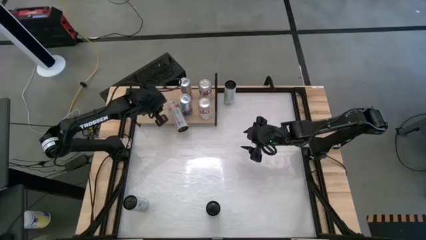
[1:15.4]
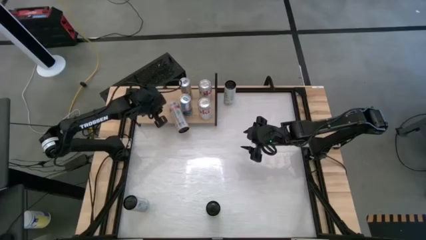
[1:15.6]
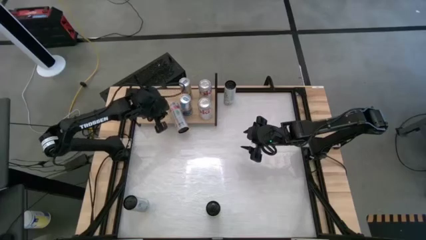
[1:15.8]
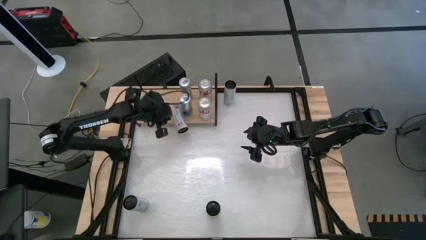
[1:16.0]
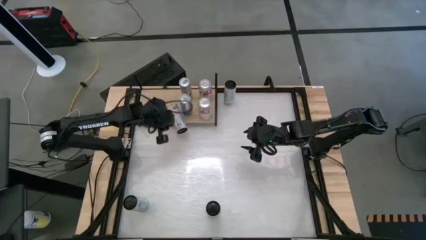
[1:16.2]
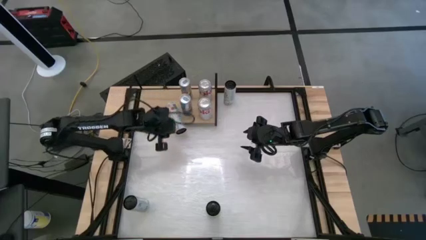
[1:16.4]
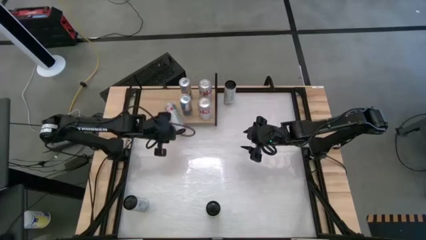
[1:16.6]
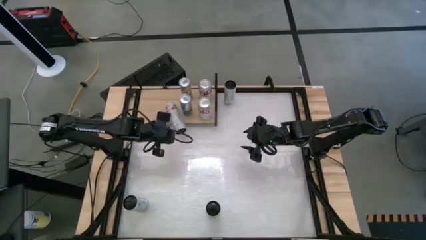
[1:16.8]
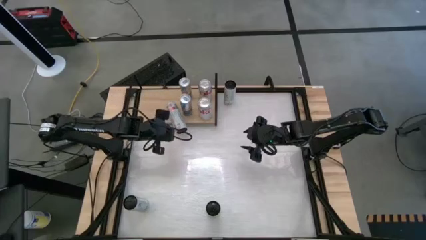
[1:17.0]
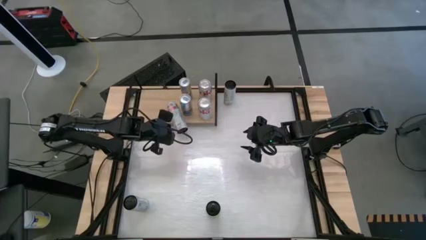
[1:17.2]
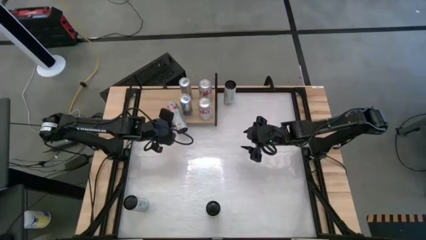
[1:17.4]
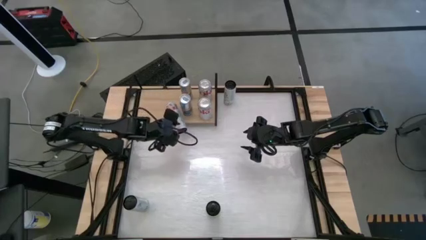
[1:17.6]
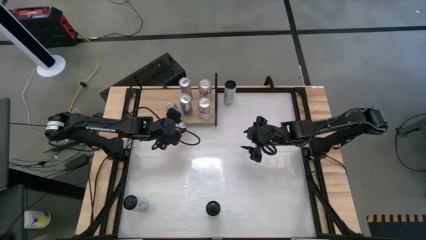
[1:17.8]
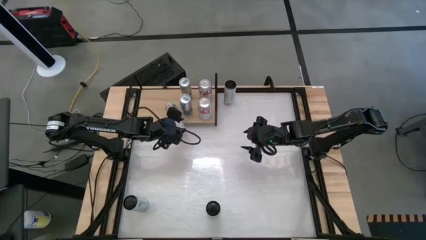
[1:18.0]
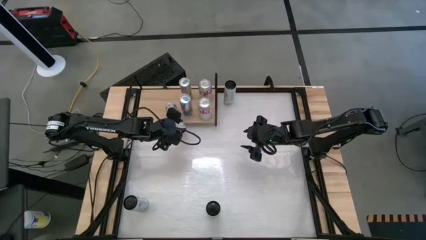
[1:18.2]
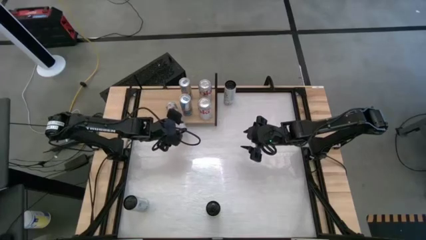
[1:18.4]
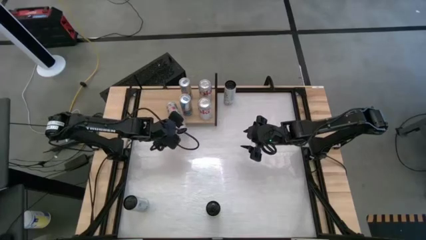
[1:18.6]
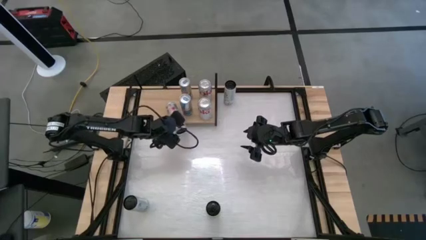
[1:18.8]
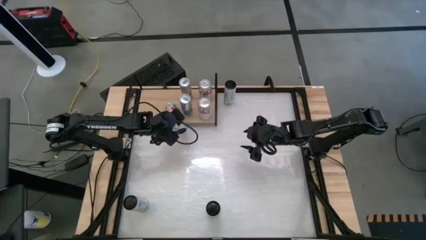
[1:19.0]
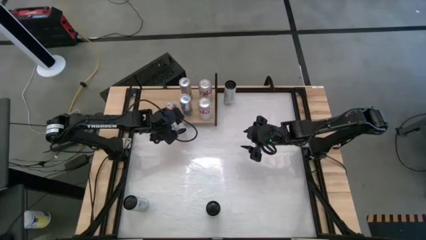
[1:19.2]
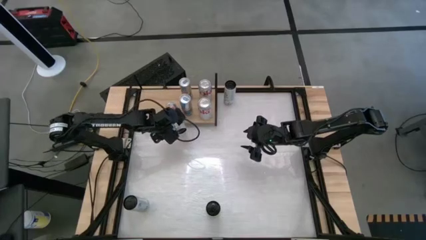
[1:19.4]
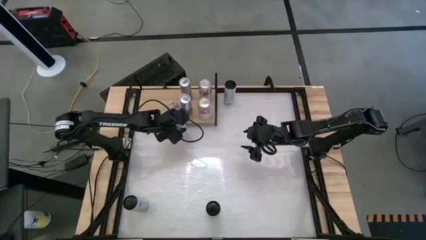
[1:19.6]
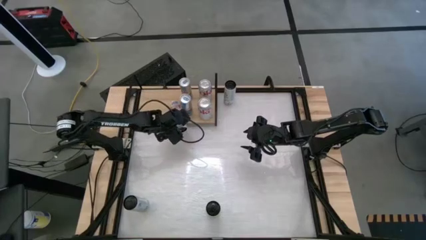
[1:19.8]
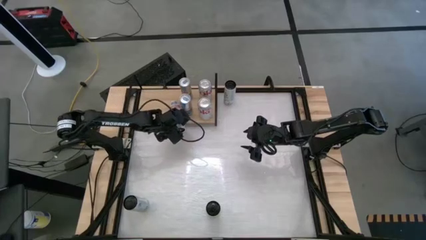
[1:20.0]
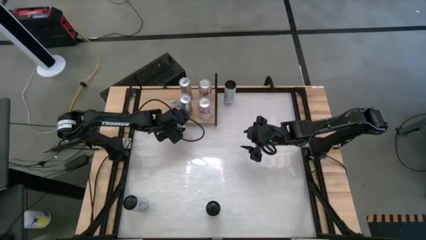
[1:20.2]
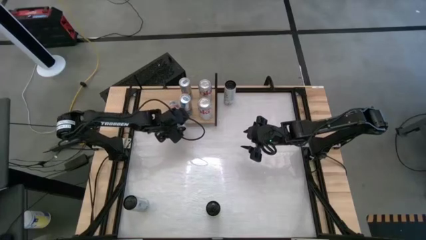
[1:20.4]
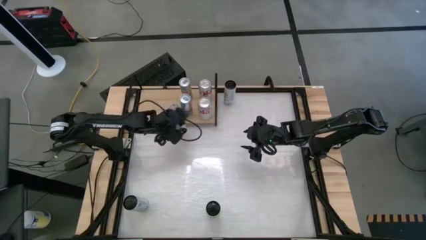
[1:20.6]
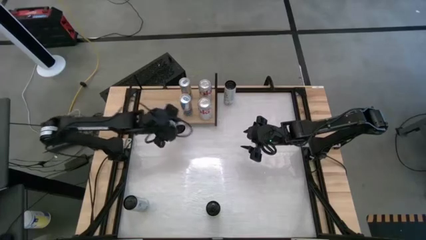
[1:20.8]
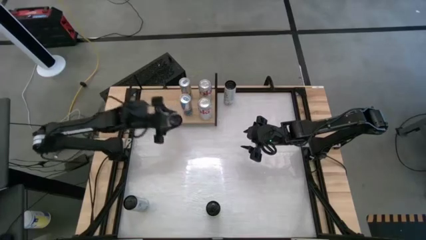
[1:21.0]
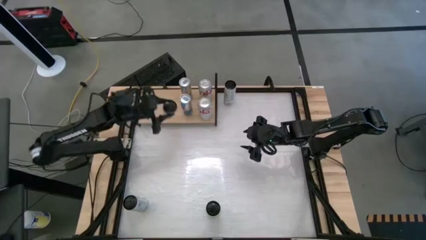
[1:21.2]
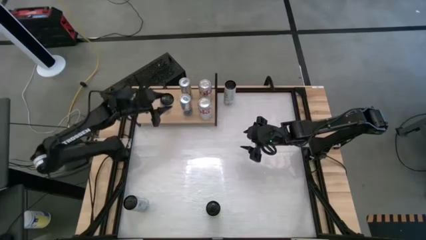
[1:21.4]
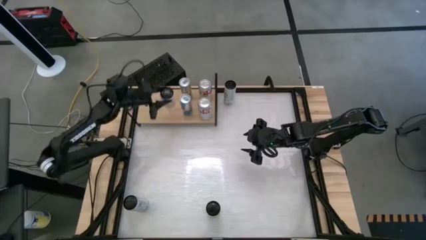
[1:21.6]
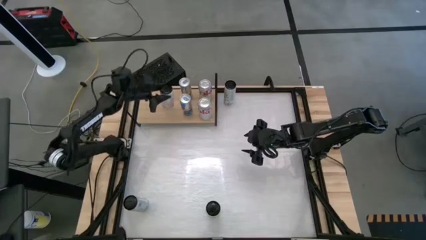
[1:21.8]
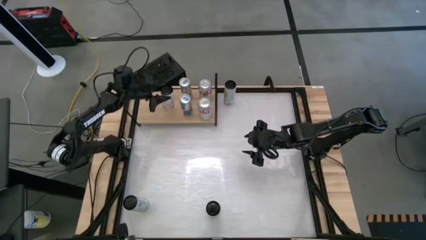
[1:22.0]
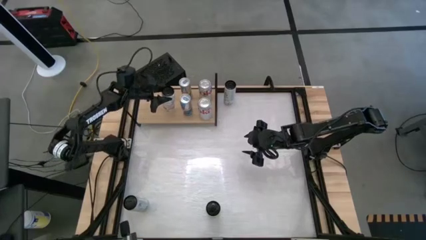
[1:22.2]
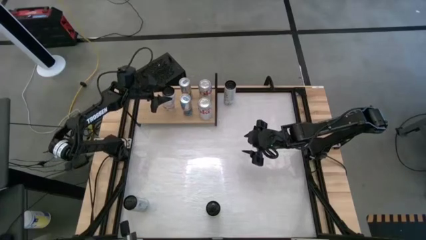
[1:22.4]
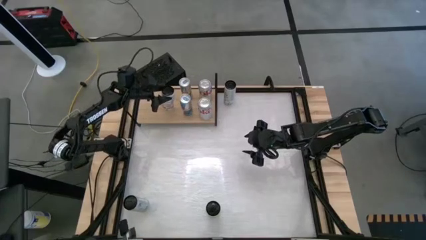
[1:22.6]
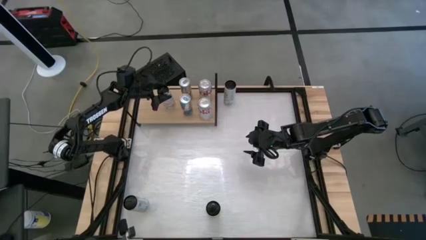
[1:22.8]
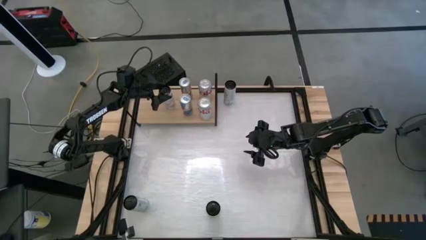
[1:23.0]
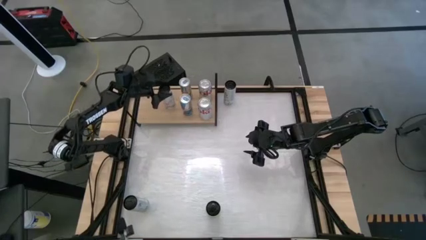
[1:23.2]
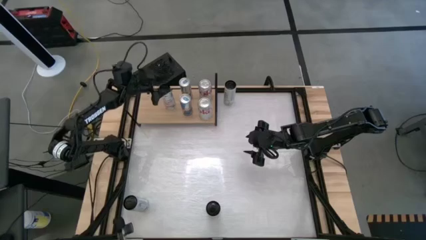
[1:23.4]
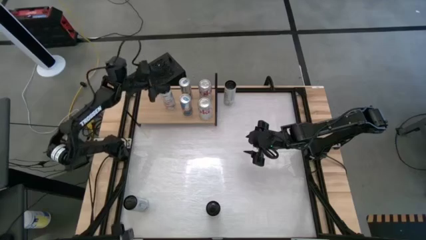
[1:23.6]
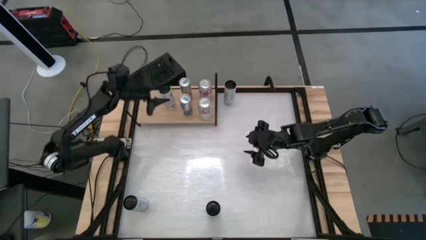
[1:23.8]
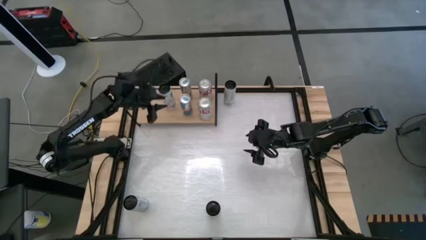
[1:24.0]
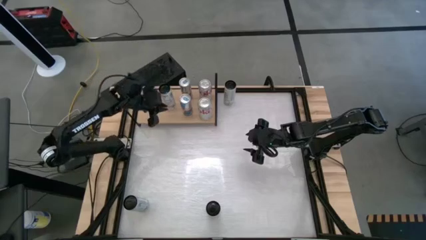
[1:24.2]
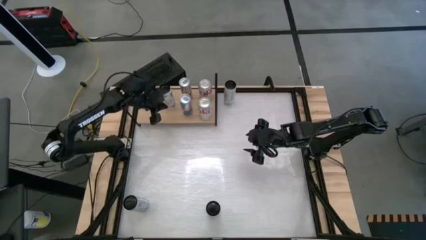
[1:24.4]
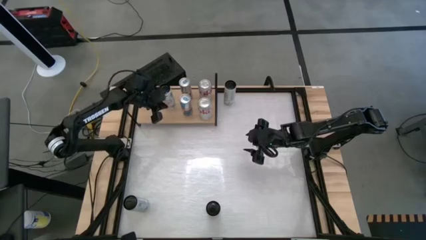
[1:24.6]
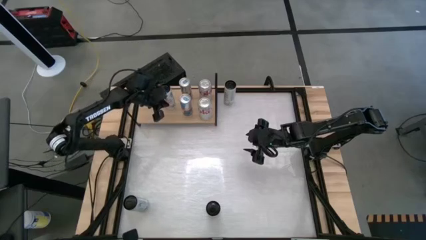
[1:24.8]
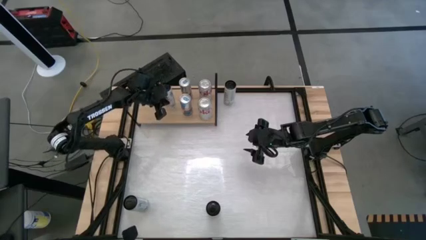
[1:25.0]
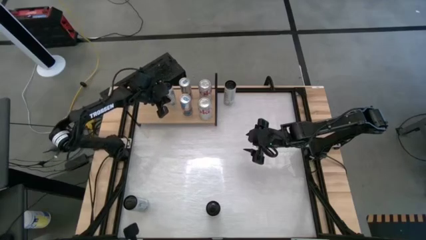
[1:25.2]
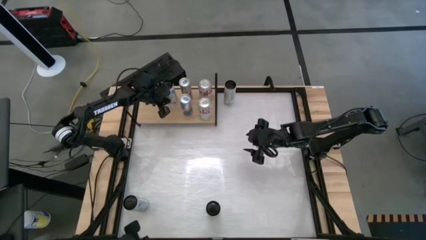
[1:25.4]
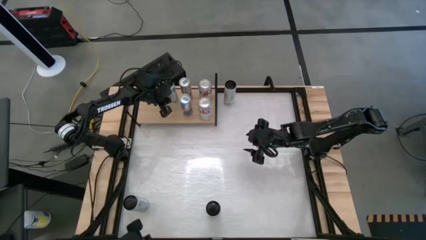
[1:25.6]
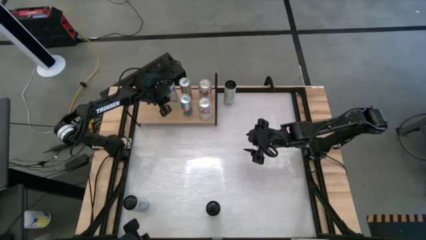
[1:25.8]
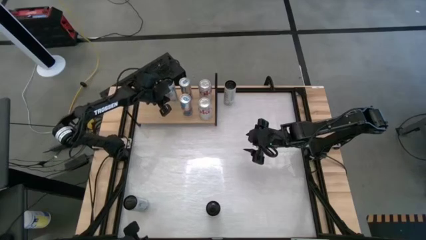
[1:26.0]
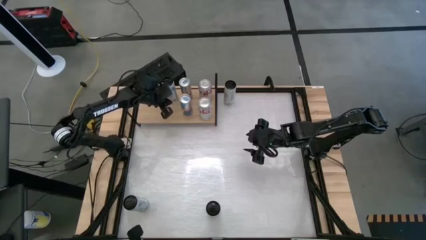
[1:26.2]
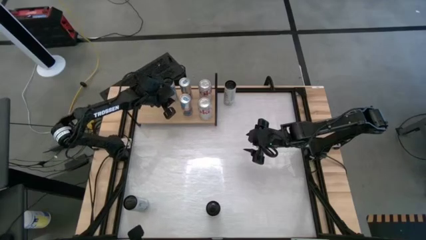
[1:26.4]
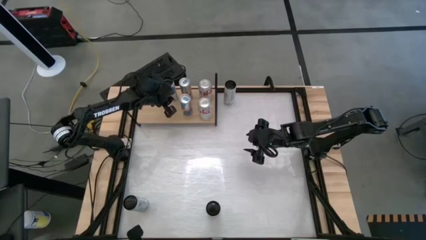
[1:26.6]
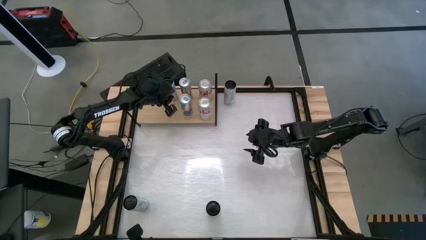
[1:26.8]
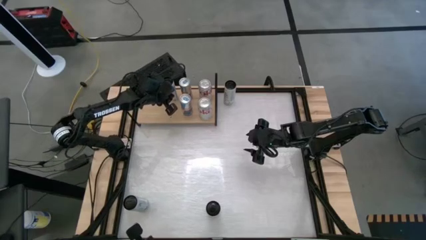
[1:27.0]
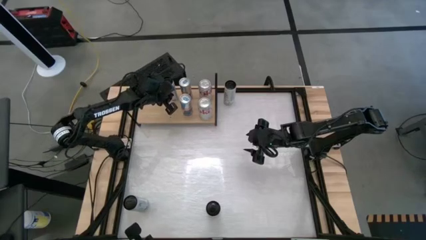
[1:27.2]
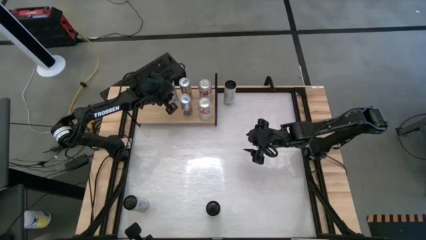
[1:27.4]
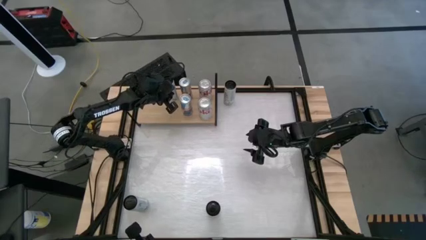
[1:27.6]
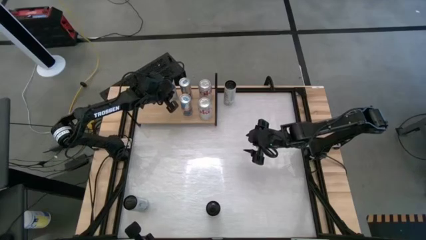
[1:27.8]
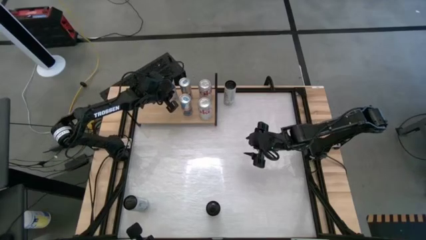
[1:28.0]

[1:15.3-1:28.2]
Task: Place canned beverage on shelf
Put the right pink soda can on the shelf

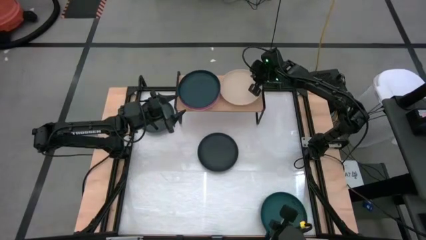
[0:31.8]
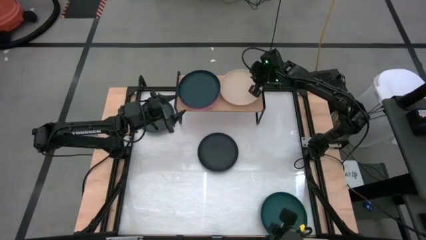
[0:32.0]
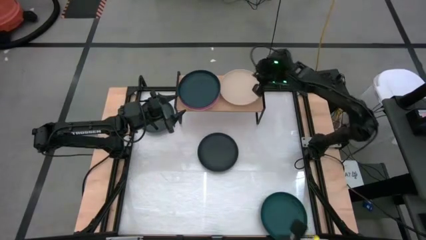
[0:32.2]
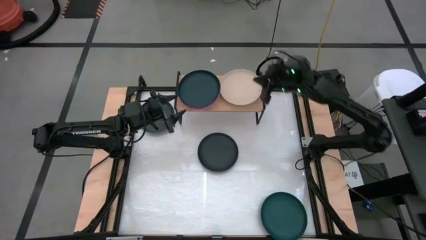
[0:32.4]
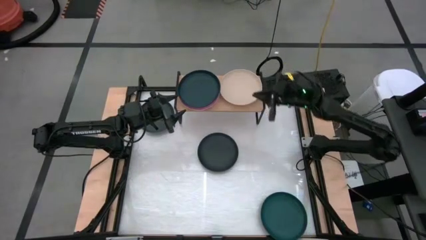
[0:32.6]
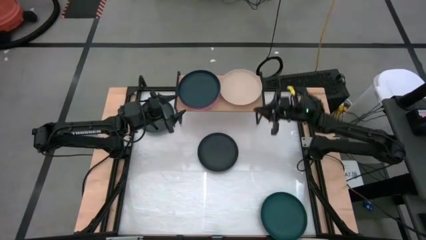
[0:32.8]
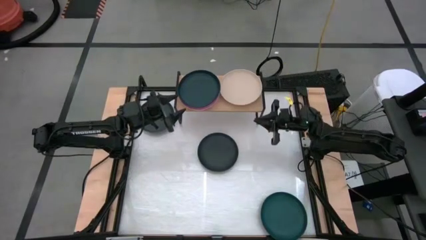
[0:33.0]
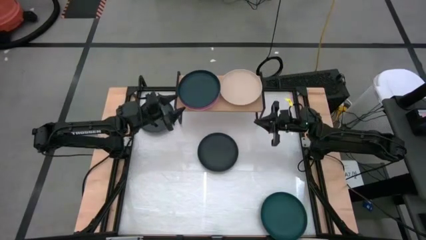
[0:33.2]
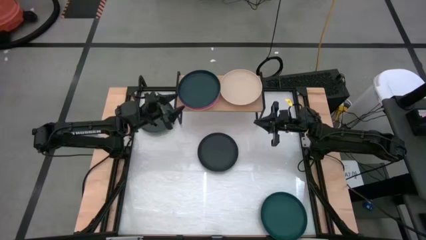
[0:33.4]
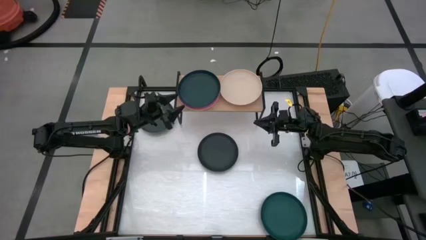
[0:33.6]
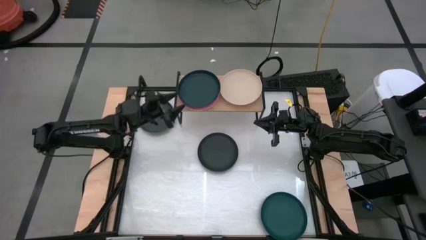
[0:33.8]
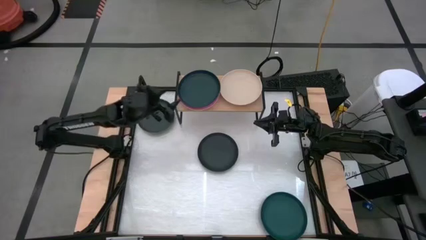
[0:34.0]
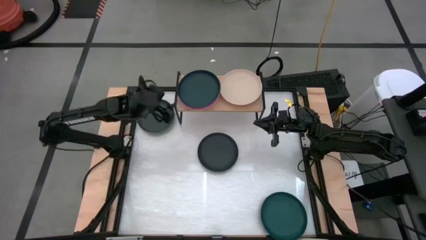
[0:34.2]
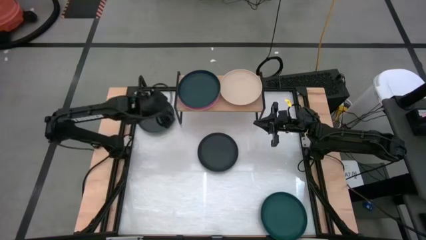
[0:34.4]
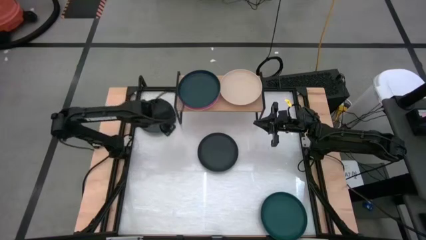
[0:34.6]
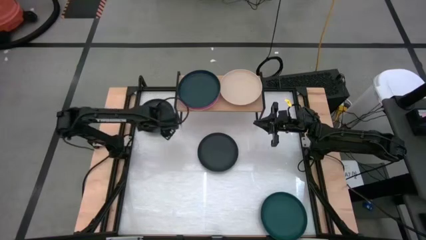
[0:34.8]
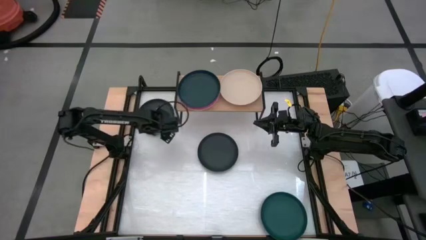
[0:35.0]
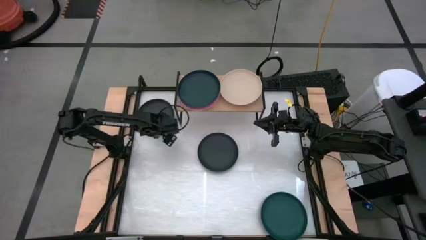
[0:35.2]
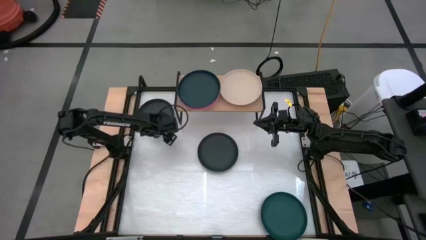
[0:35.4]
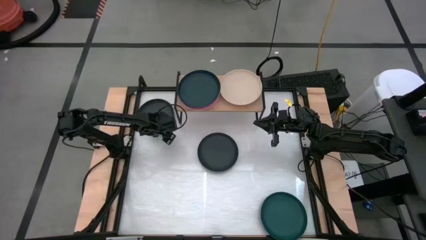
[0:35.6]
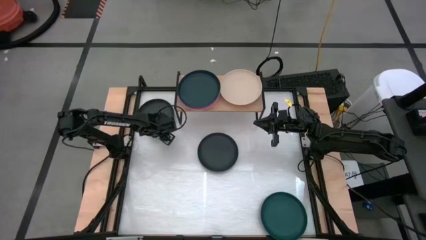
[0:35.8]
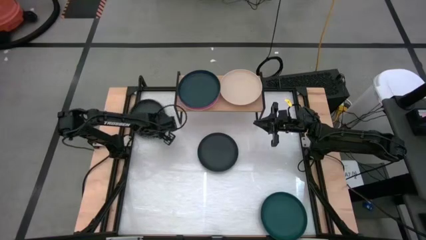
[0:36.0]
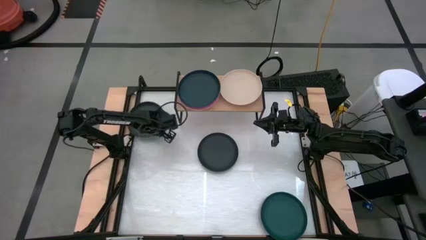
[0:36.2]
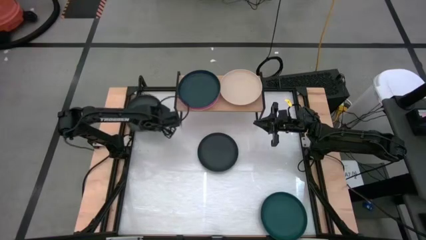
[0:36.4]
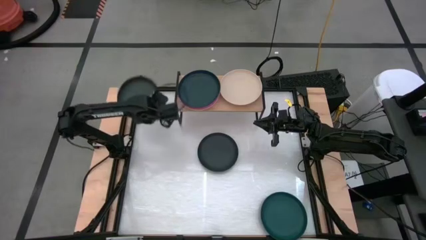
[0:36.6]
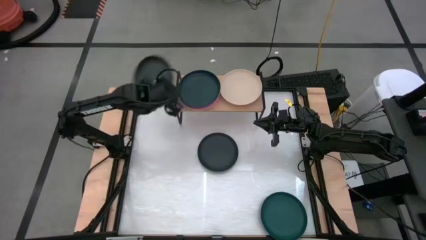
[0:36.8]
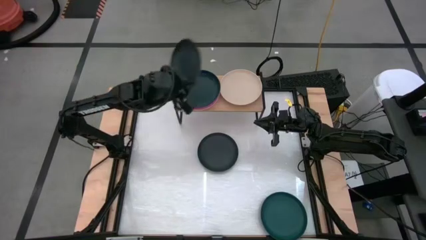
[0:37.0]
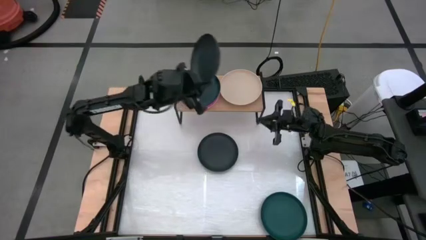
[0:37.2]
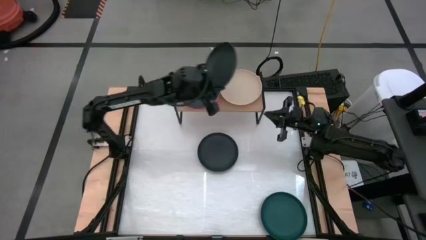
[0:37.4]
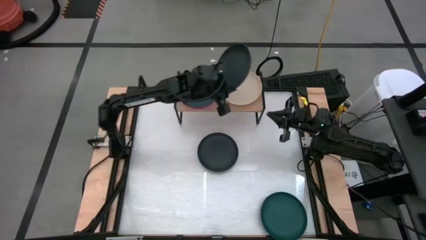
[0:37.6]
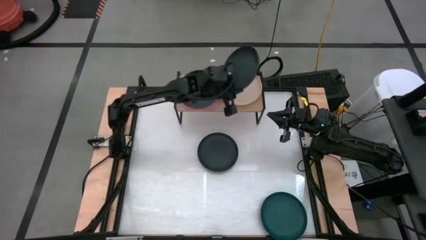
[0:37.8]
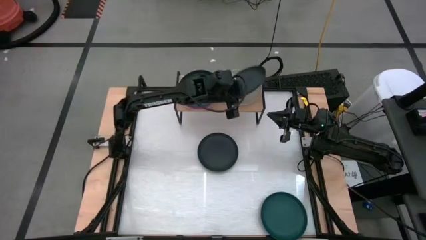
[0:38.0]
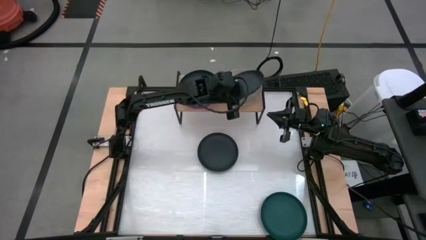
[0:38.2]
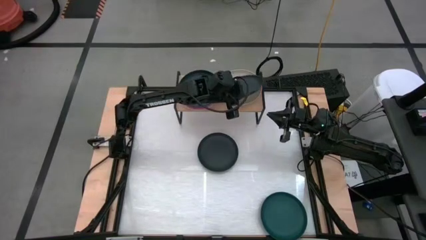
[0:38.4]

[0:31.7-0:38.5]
Task: Place and stack plates onto a shelf
Stack the top black plate on top of the gray plate on the shelf
